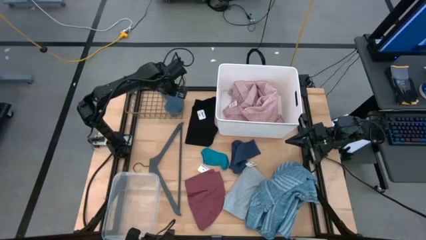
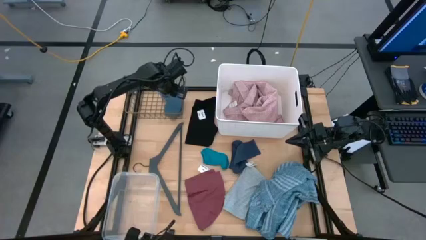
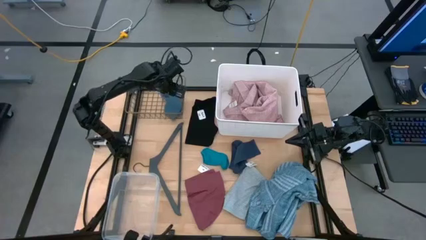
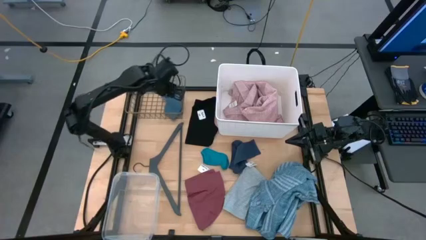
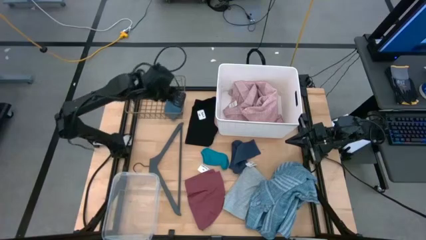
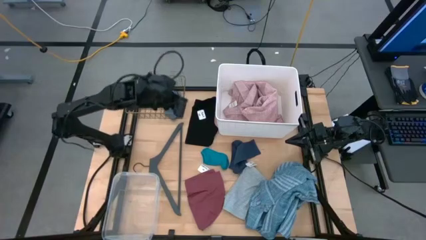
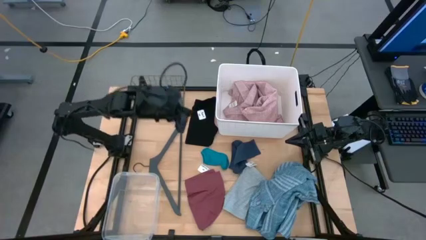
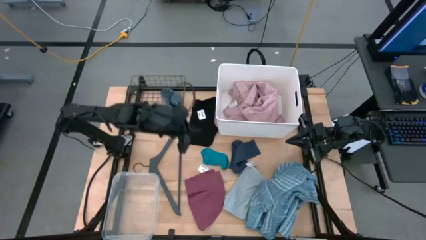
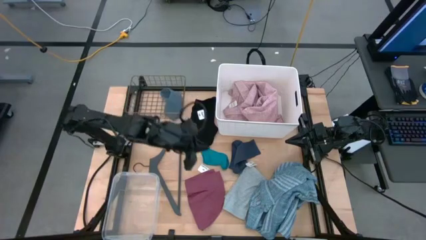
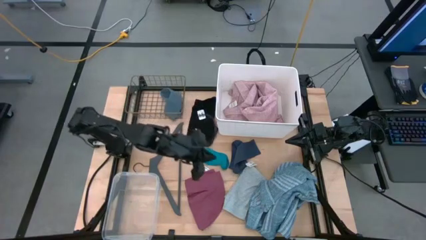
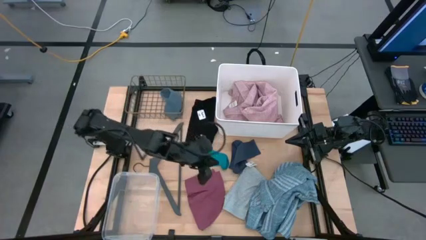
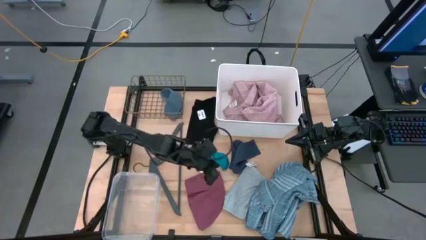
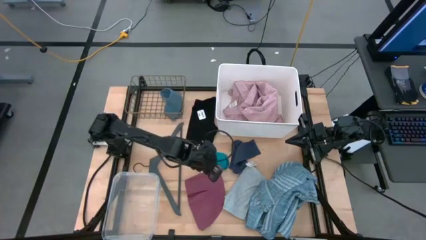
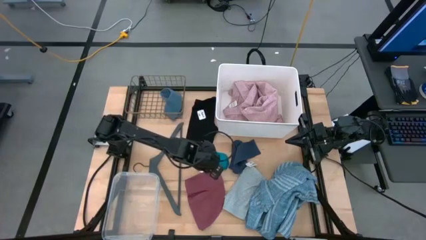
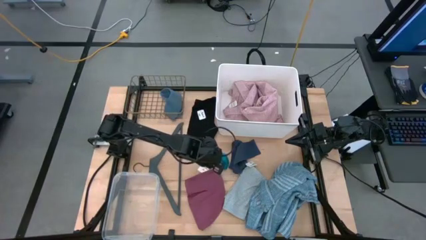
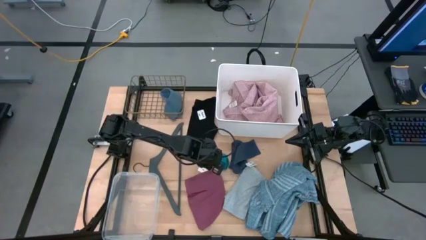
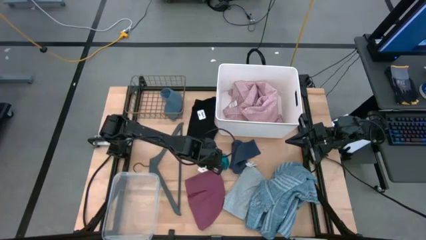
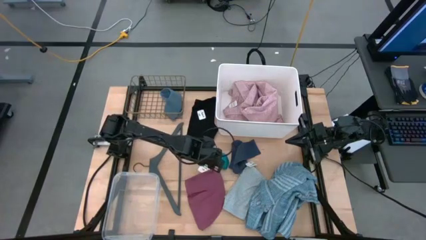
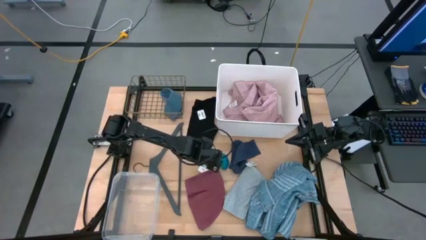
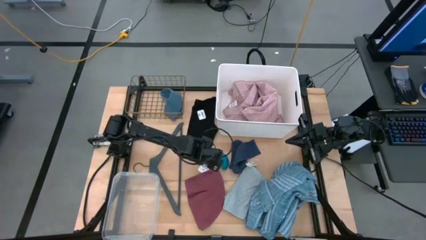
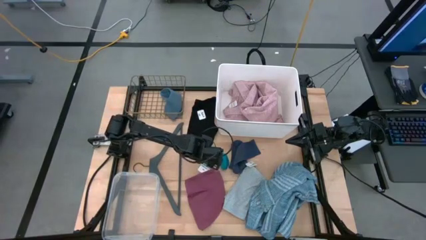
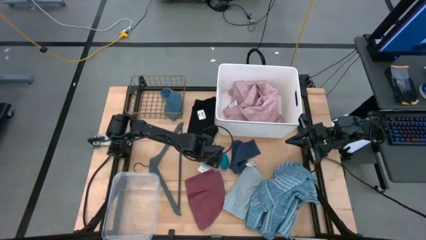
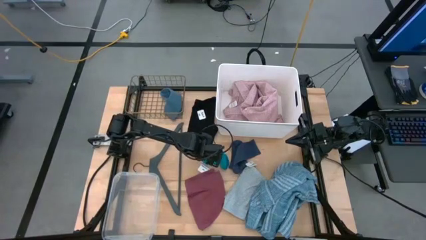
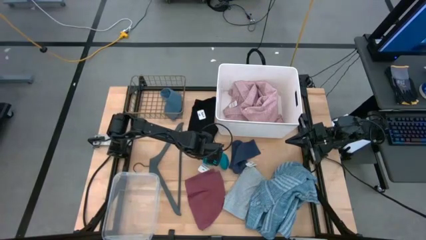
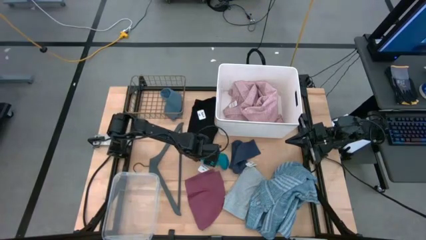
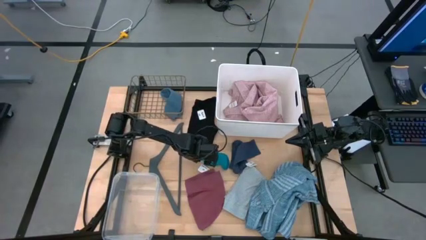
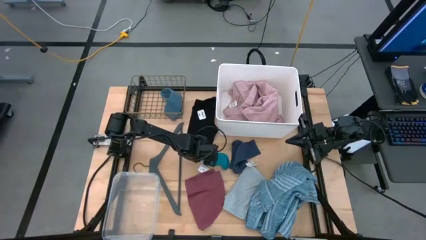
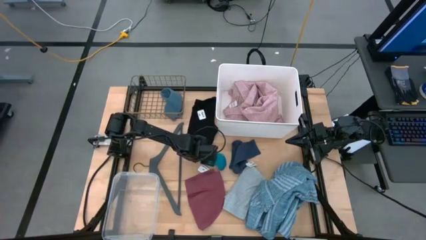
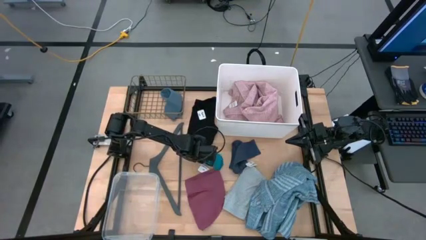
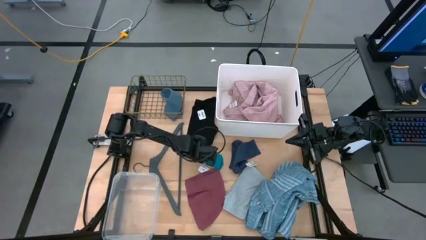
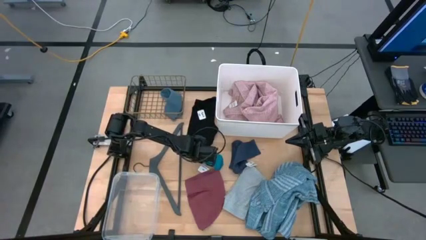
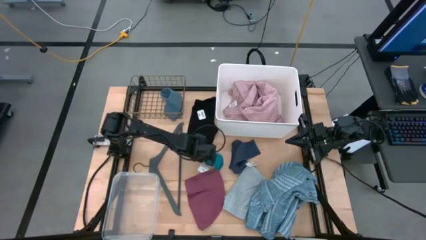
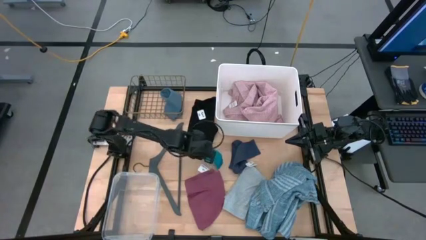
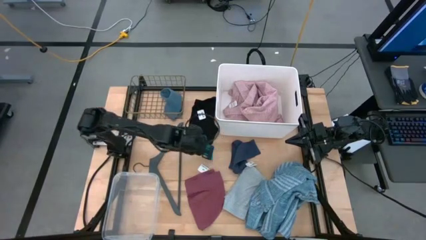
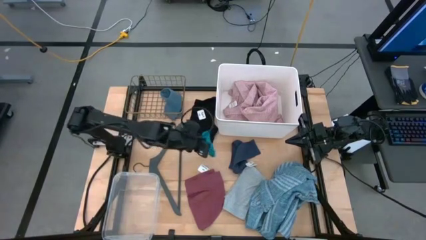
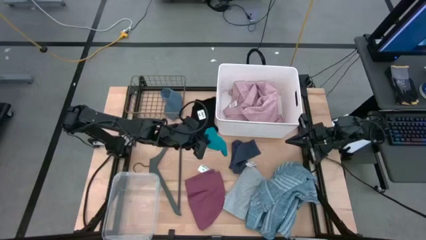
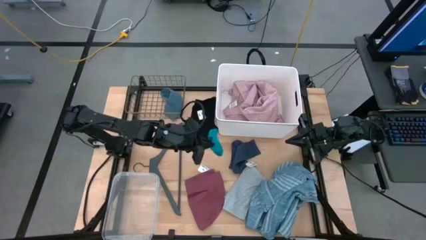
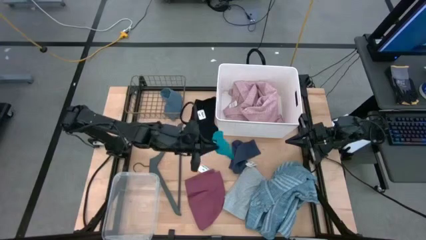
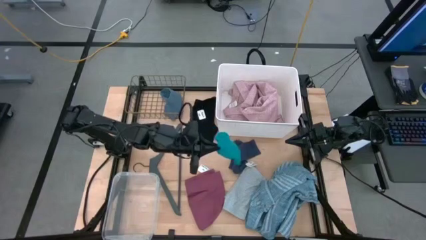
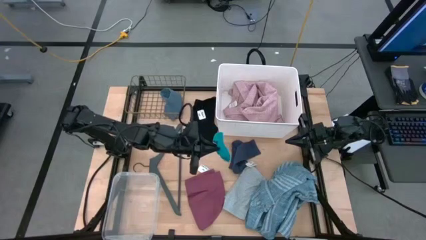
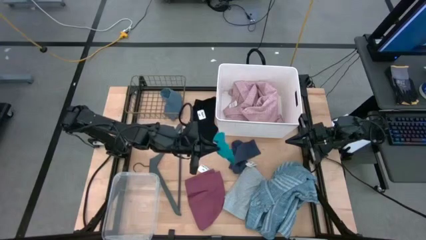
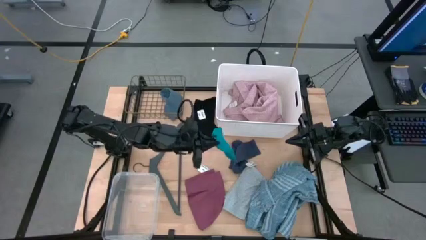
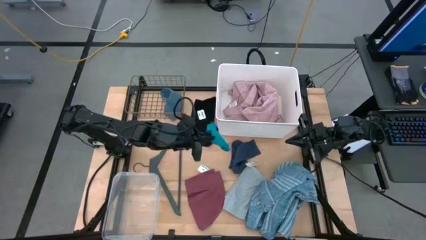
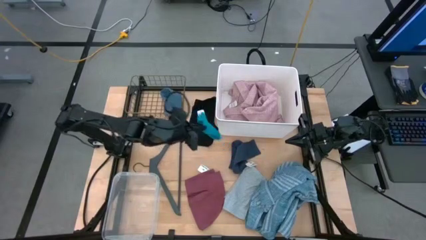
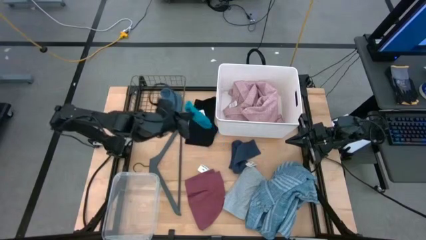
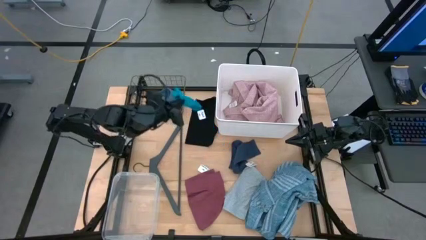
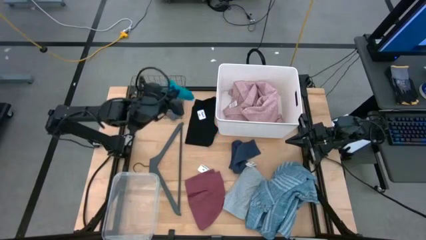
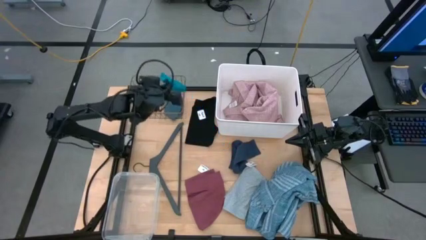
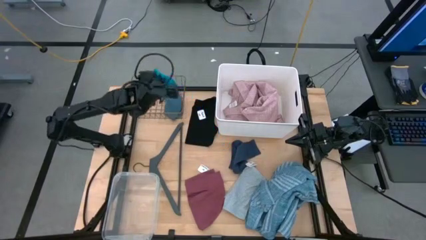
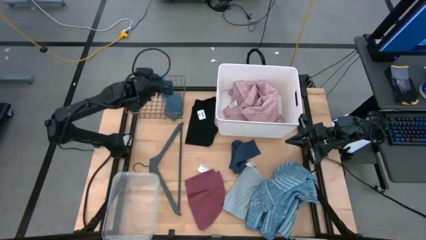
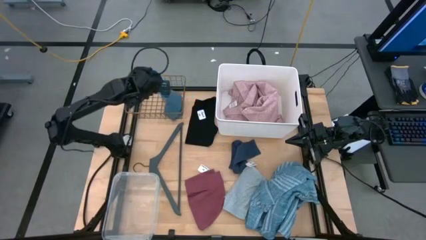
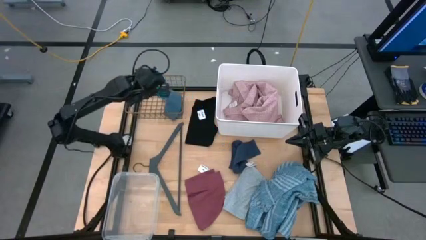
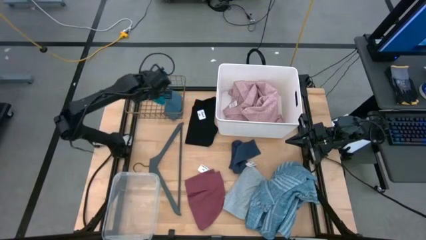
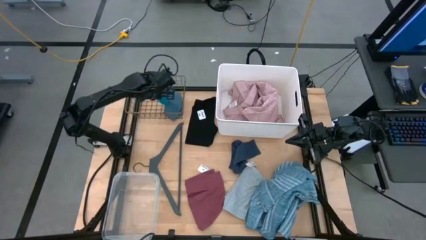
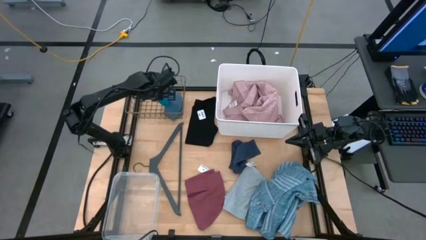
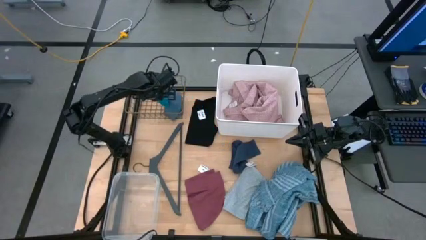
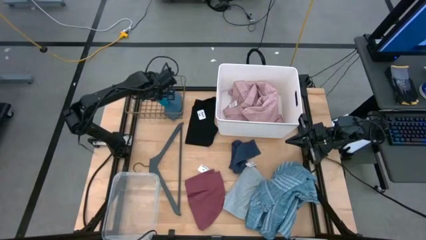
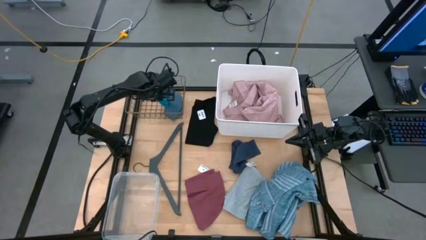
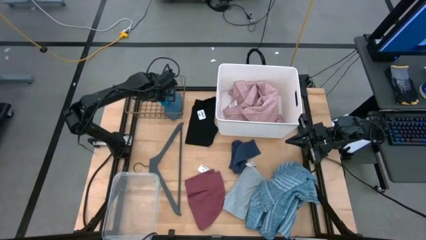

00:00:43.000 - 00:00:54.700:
Task: Pick & Place Cloths
Put the blue sock in the gold wire basket

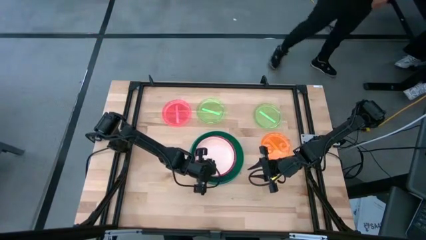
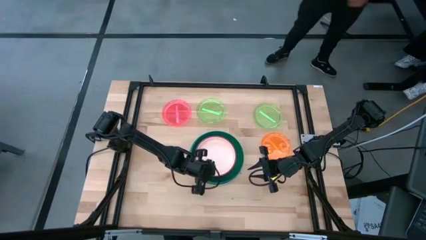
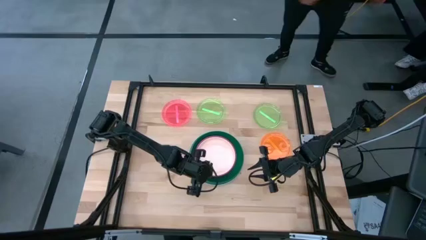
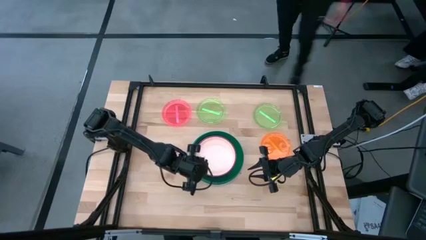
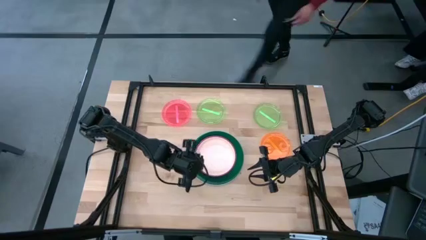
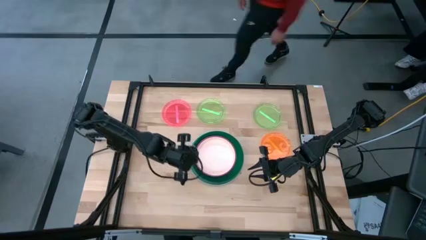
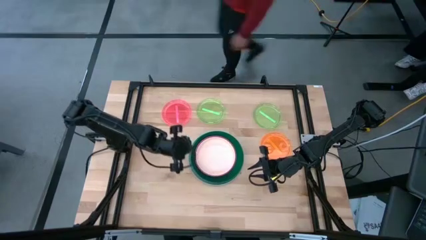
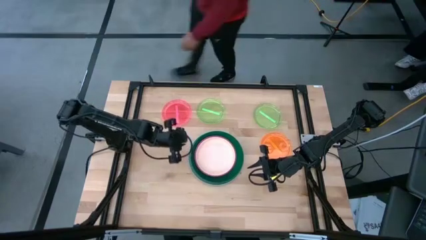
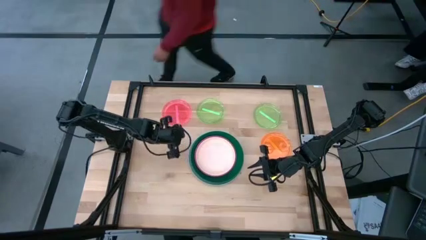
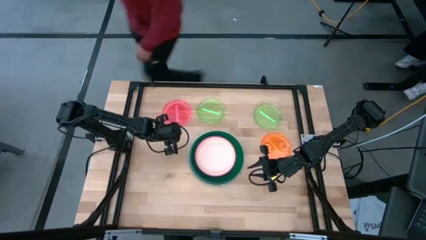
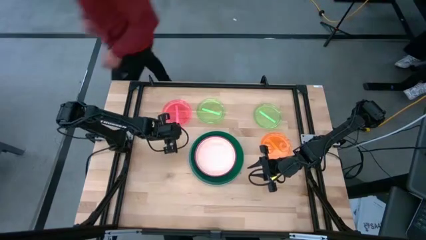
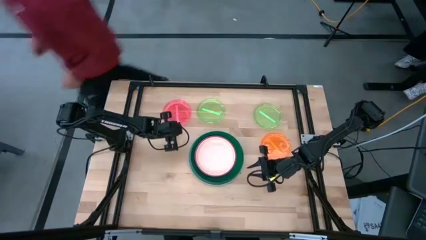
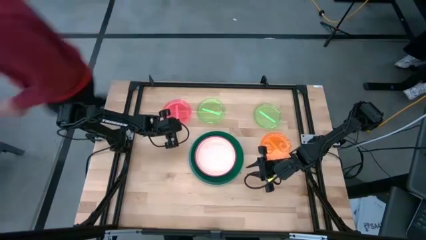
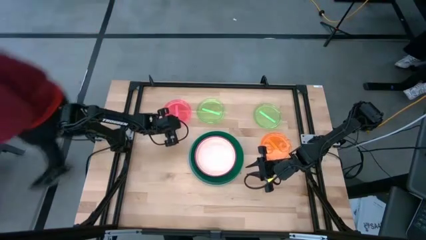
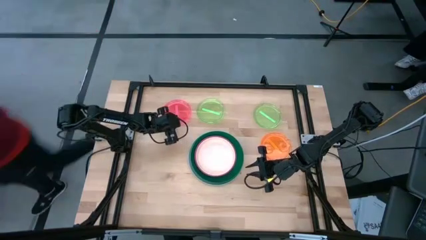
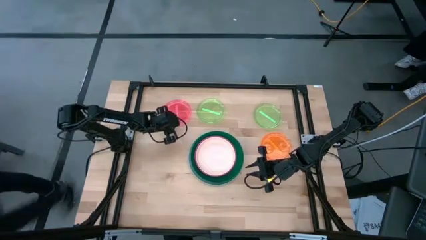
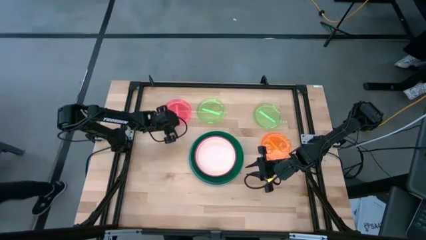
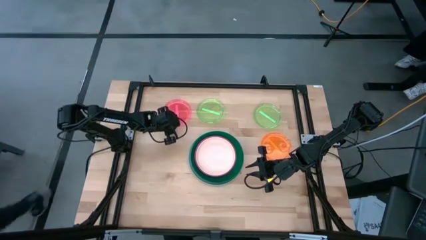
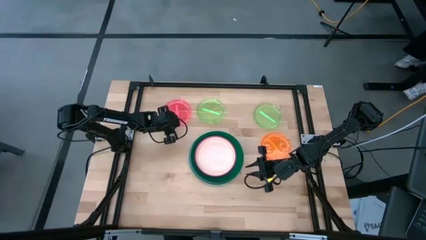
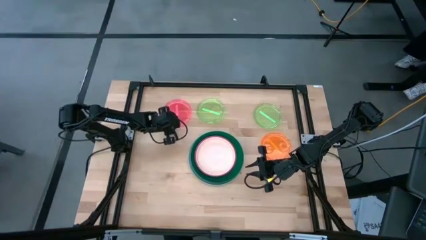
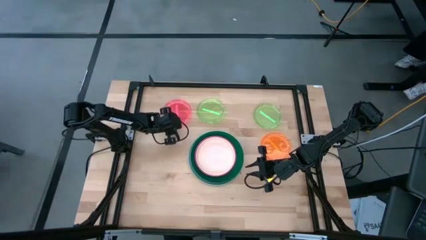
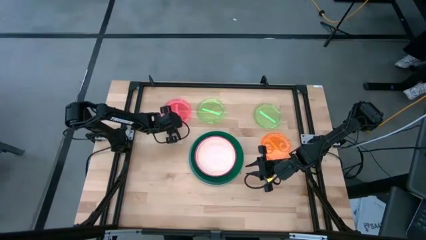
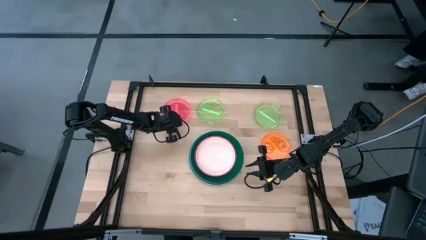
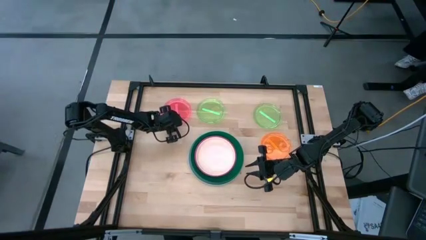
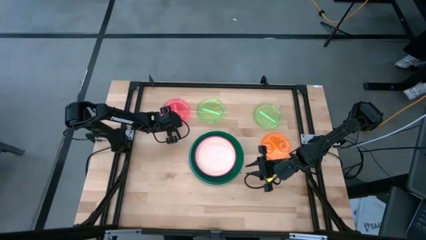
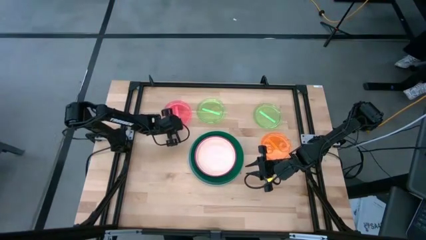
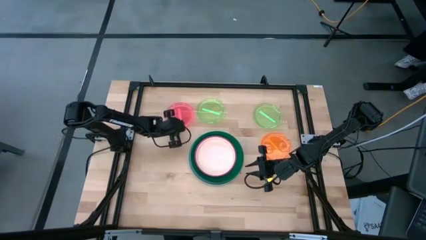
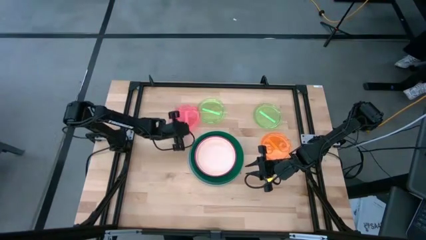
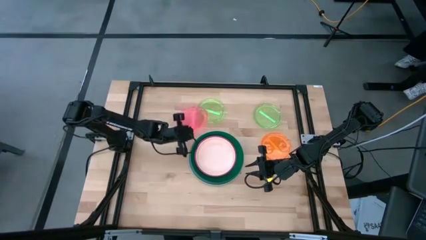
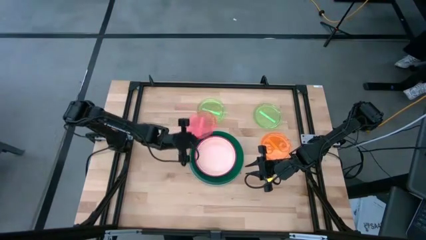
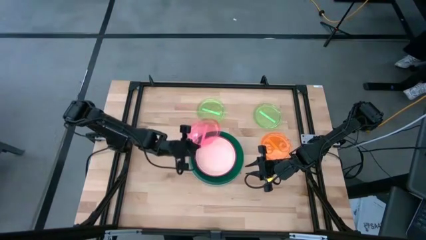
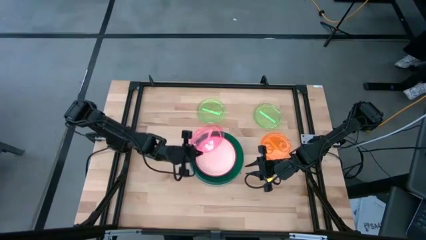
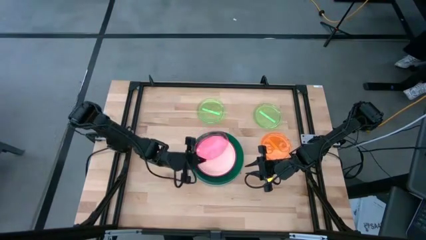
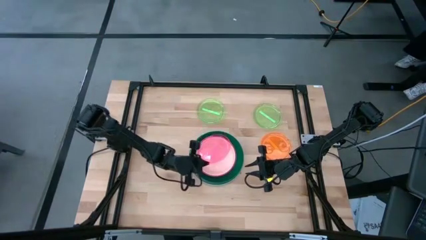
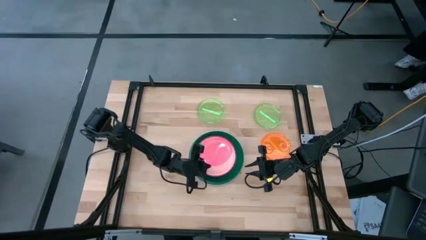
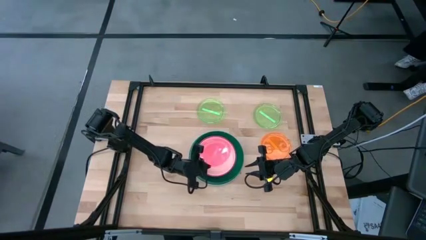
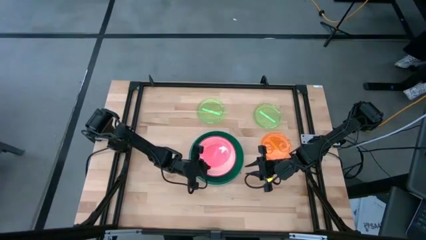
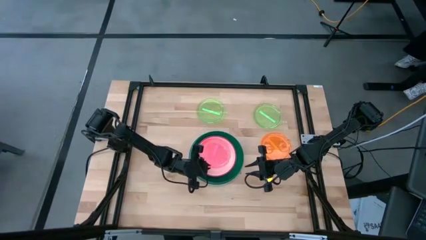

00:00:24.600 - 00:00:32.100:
Task: Stack plastic plates
Stack the light pink plate on top of the light orange plate
